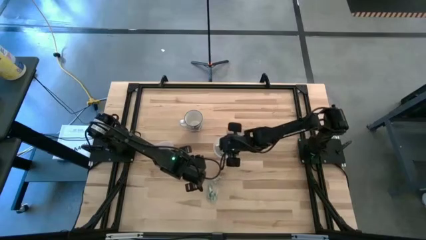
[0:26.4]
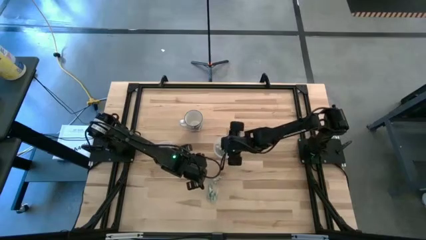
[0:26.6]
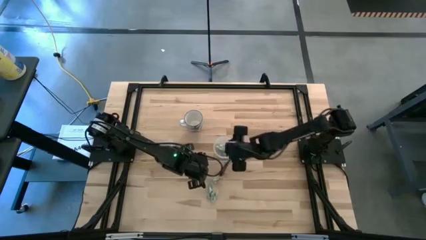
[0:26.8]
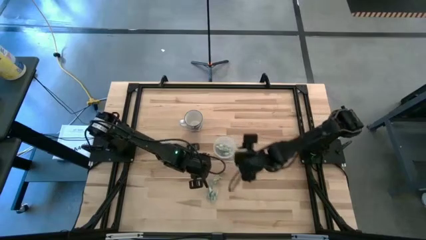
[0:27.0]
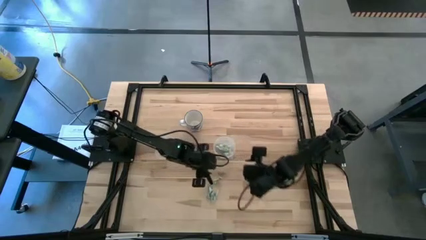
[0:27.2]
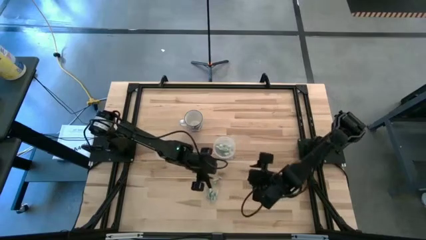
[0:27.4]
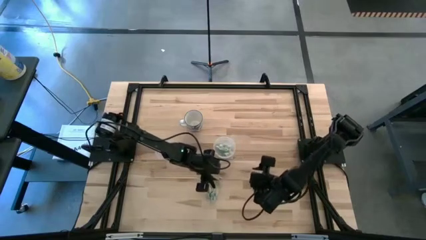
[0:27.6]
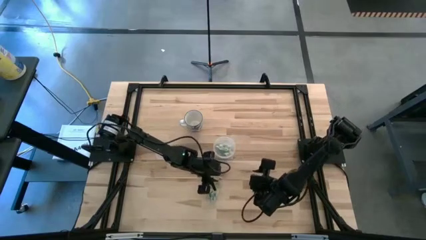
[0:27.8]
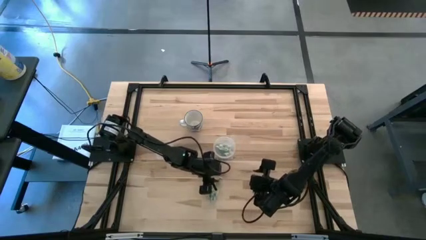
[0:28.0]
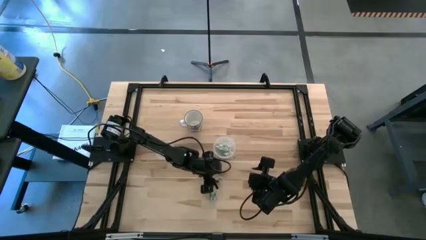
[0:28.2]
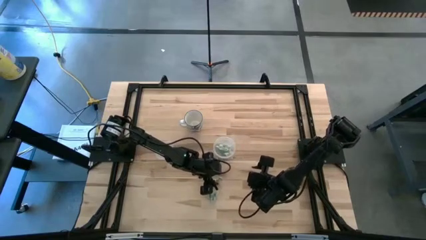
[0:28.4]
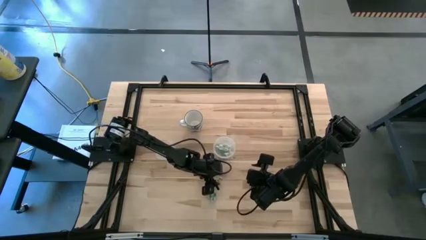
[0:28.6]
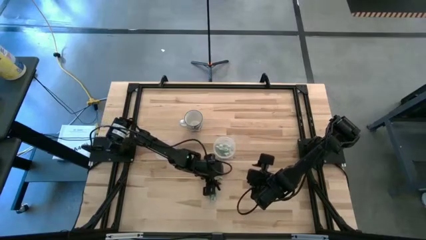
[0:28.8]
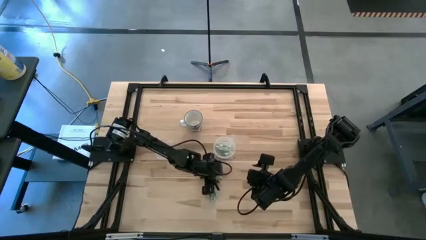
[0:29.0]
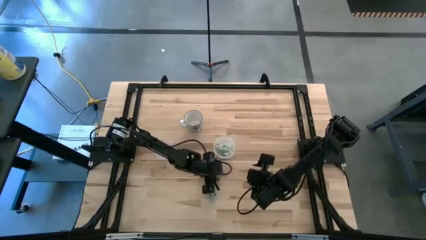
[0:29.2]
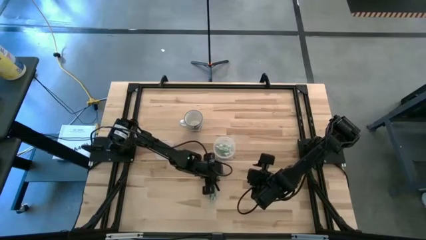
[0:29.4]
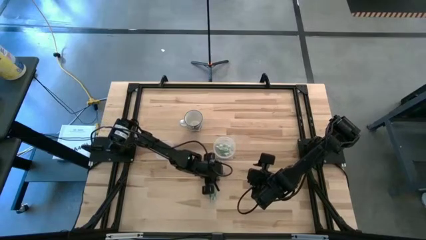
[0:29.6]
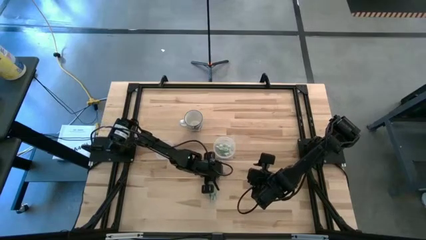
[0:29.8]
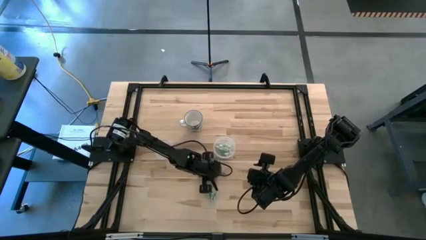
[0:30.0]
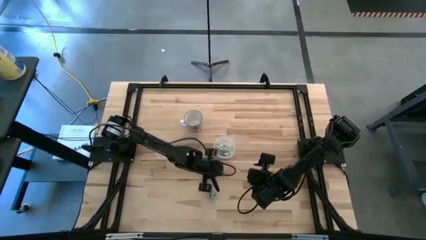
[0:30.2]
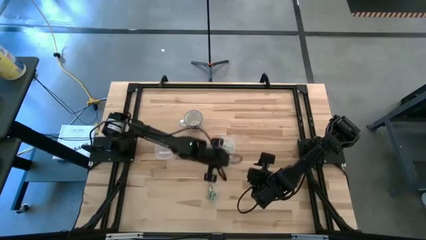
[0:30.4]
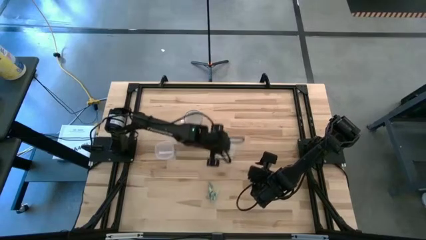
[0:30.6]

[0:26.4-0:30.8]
Task: Pick and place Stevia / Truvia into bins
Put the white stevia packet into the right transparent container

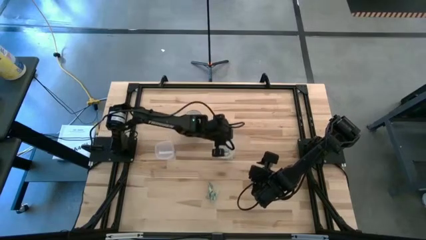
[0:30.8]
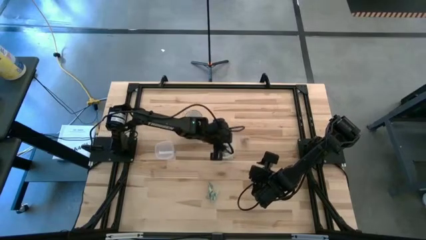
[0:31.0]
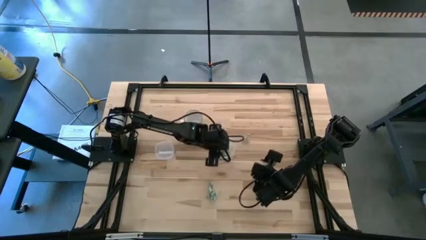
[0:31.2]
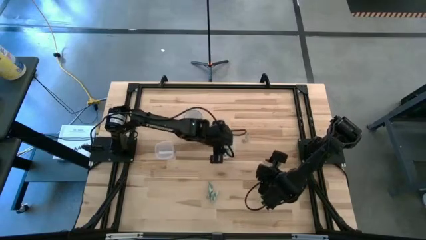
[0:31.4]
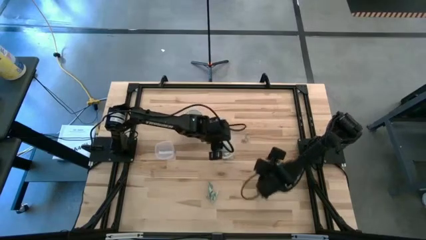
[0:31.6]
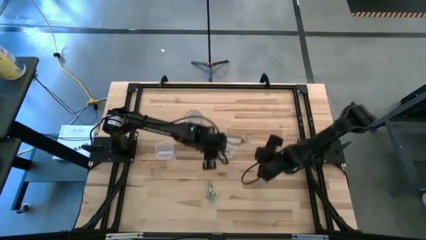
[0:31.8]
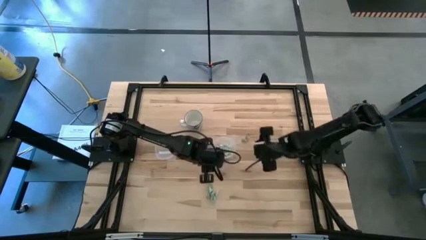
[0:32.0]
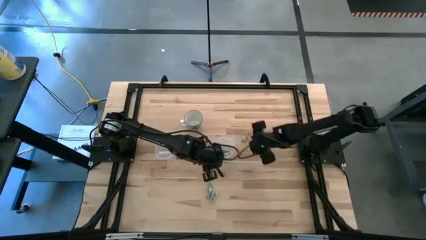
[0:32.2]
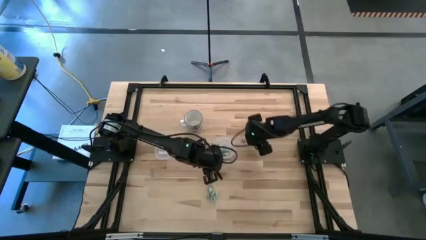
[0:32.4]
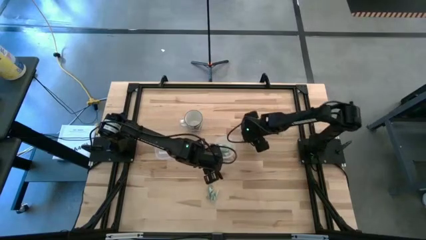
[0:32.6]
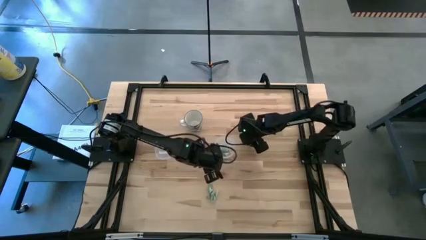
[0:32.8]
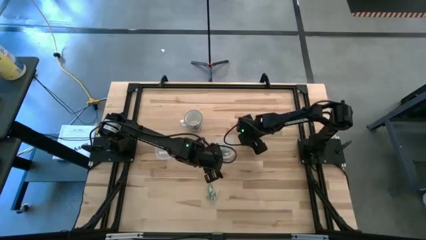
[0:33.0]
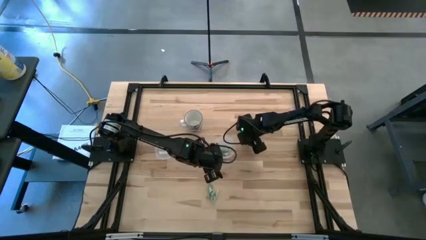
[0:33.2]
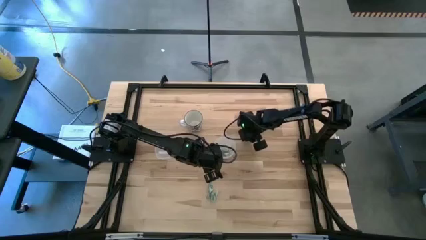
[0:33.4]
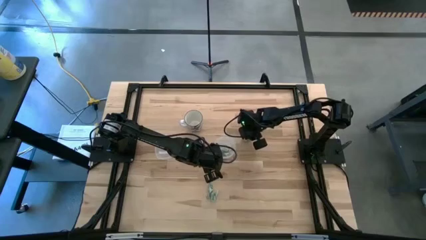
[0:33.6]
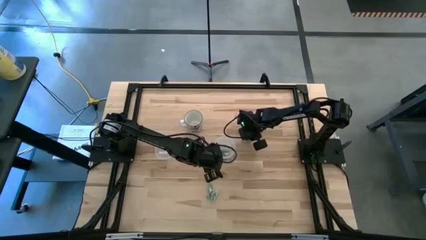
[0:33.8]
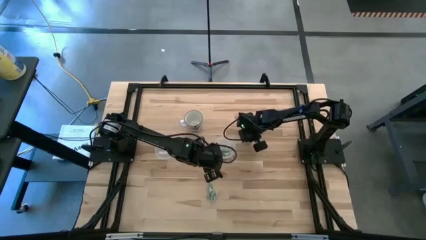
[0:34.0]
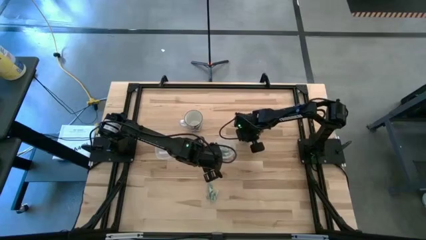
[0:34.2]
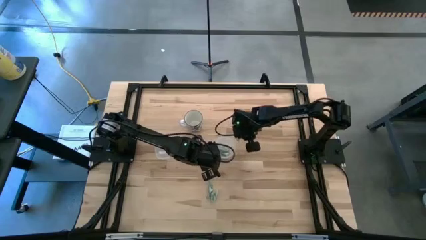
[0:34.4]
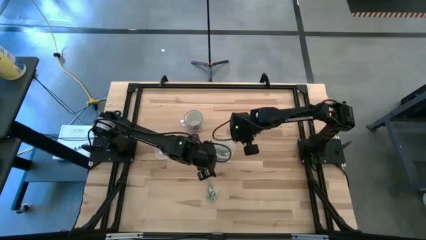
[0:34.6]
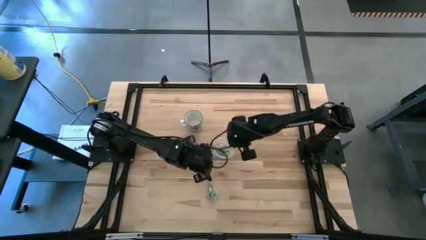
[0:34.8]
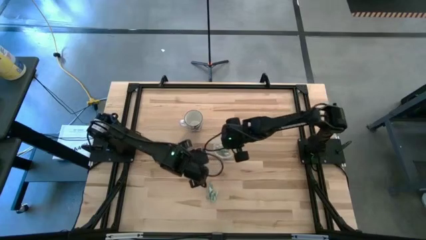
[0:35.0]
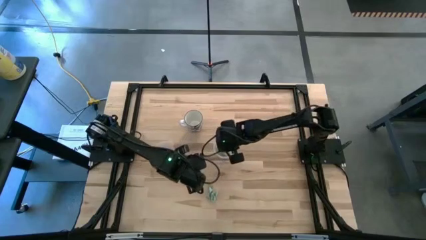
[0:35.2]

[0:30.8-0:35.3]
Put the white stevia packet into the right transparent container

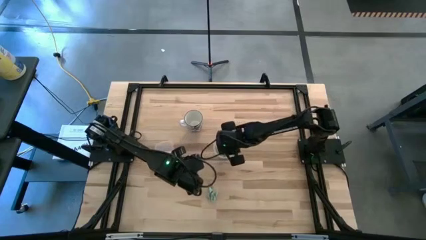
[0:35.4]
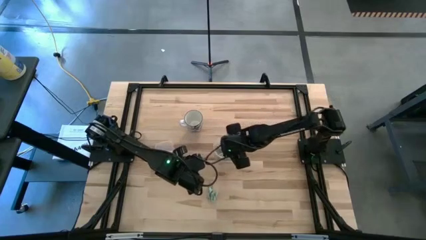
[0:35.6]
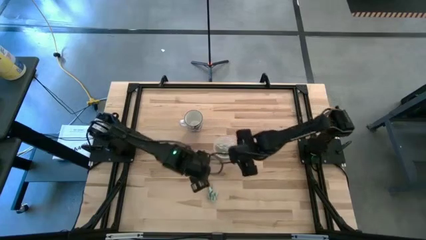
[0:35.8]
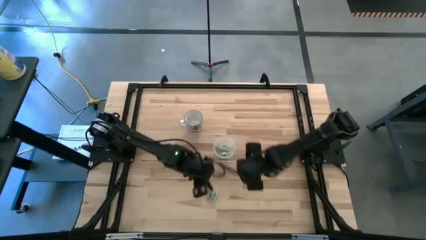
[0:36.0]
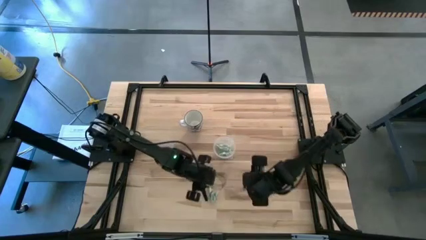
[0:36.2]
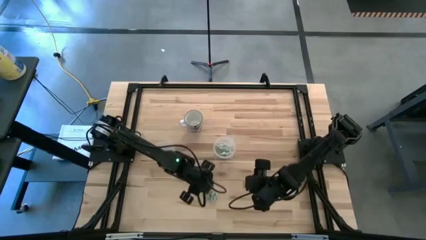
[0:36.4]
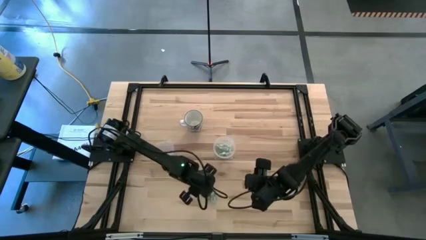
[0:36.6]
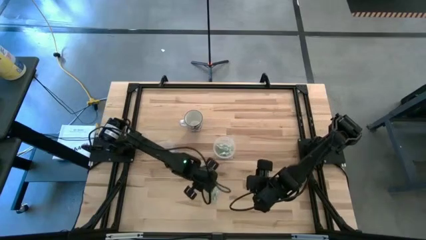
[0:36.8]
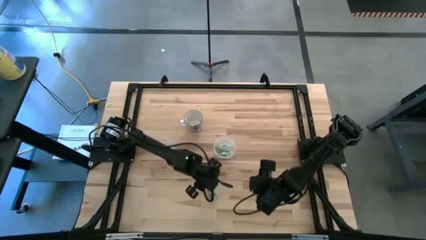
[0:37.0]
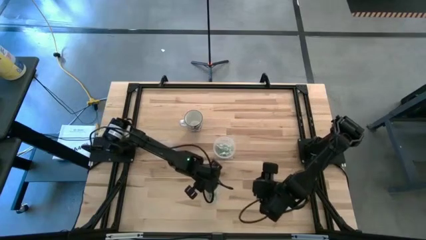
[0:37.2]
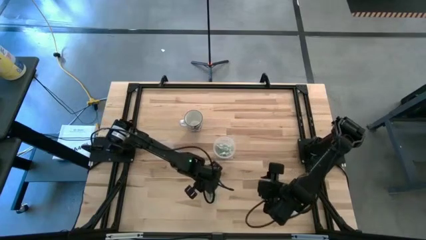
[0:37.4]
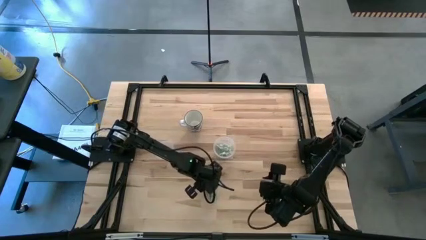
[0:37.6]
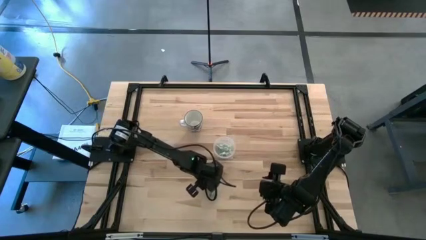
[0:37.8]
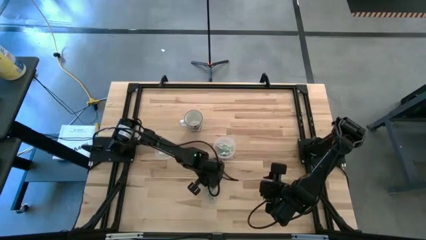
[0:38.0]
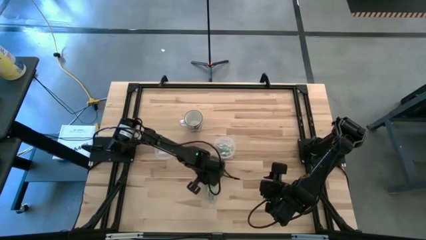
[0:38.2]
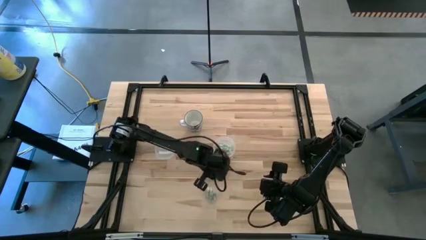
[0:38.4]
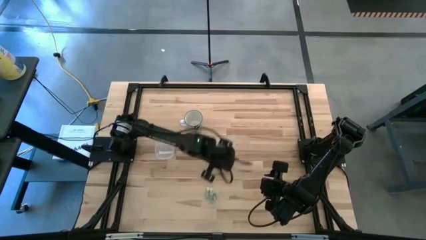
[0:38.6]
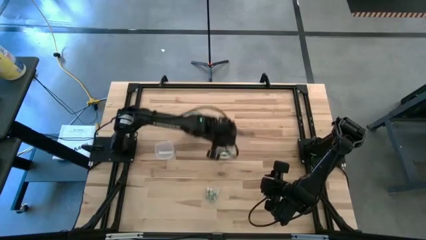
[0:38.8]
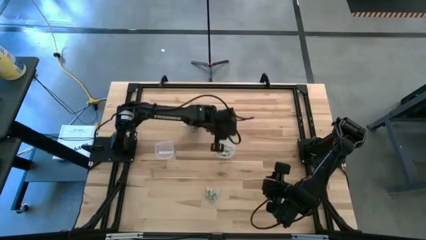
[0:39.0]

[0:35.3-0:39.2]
Put the white stevia packet into the right transparent container

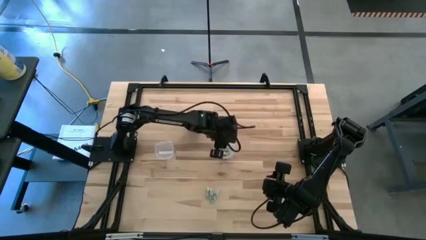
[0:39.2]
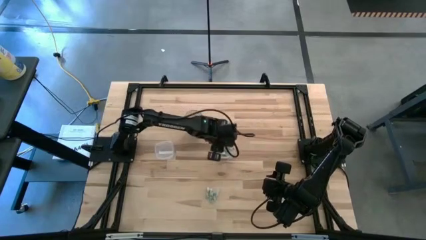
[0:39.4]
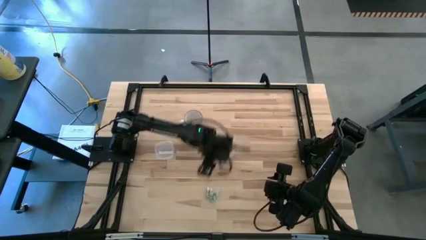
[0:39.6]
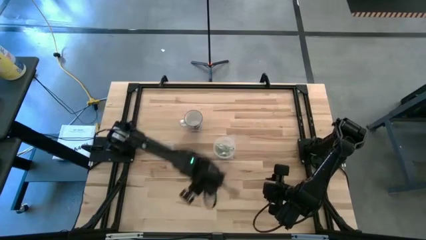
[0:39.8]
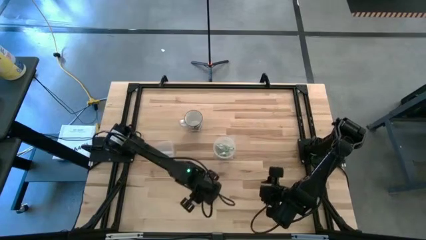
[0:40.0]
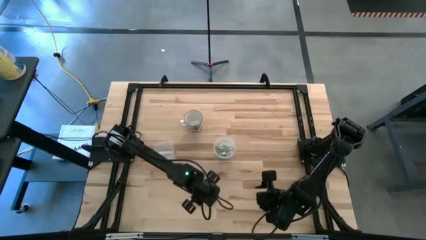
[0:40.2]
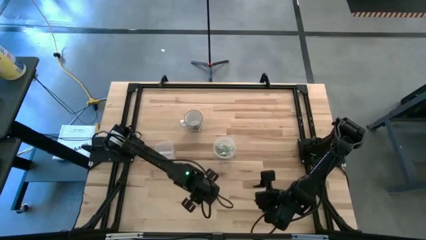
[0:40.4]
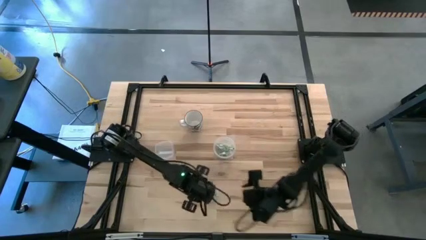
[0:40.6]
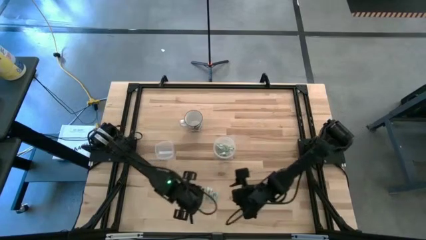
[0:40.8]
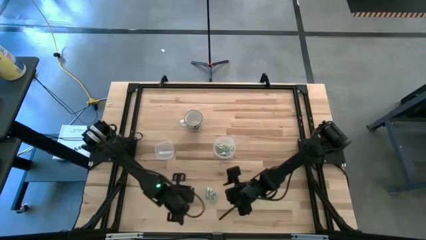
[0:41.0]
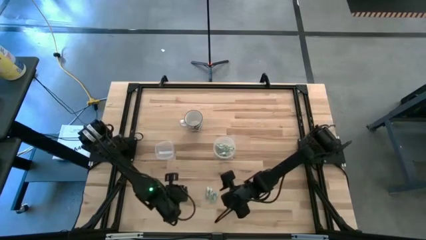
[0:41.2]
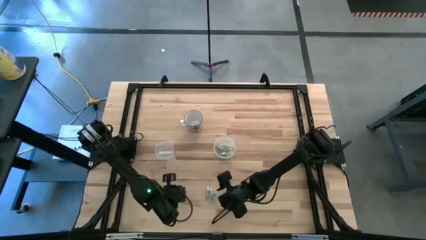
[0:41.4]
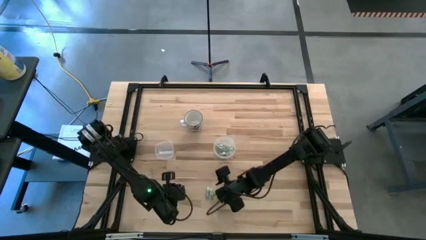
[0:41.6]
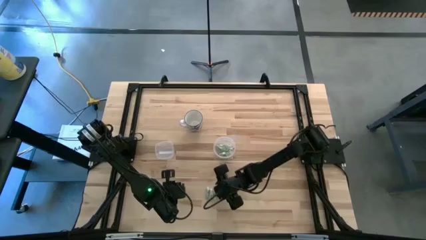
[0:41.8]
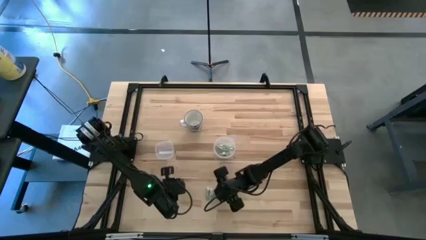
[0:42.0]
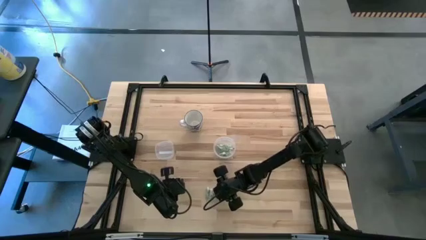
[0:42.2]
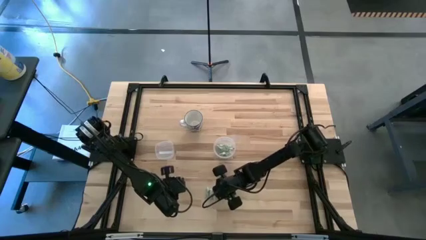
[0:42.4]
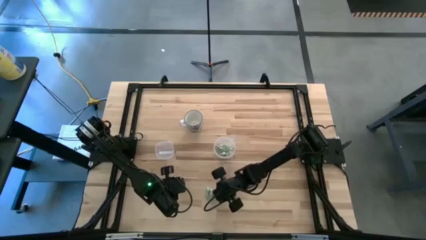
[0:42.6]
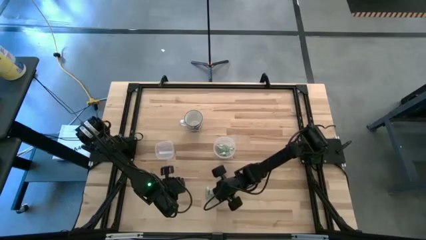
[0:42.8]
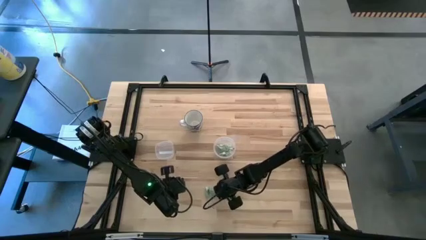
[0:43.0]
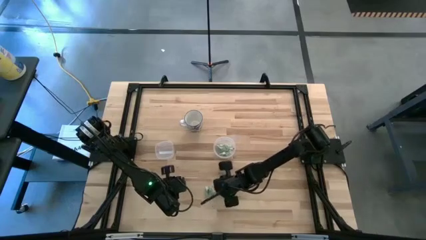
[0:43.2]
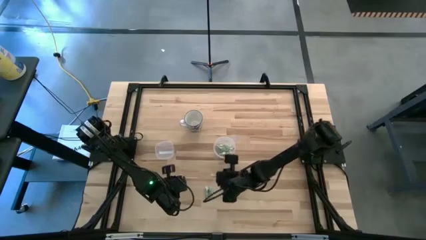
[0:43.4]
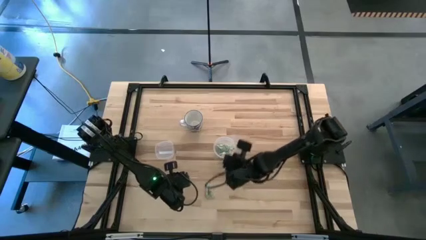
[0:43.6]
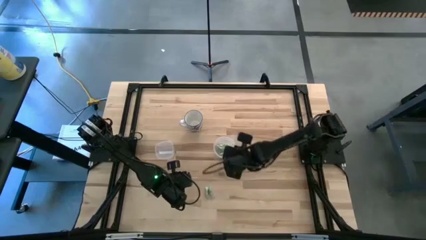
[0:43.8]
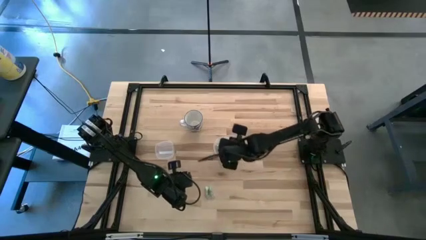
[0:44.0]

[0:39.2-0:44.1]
Put the white stevia packet into the right transparent container
